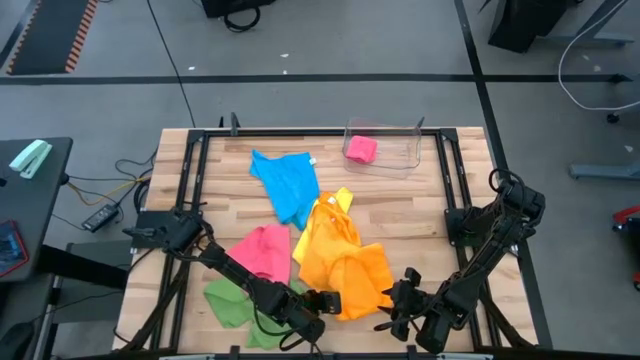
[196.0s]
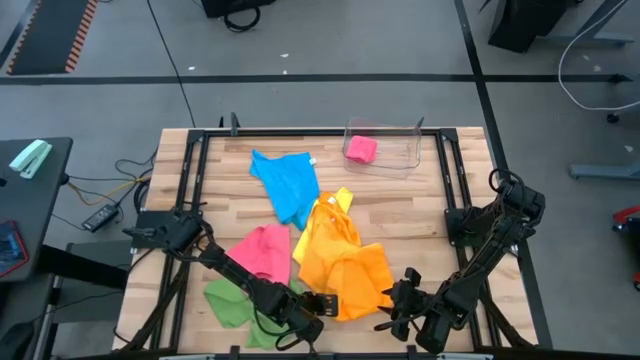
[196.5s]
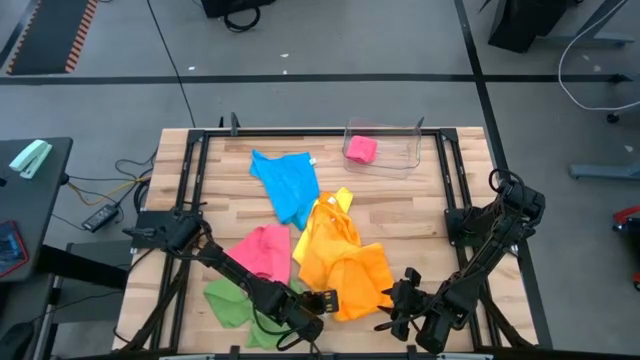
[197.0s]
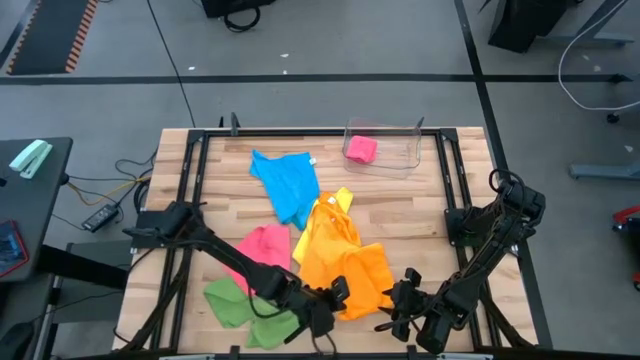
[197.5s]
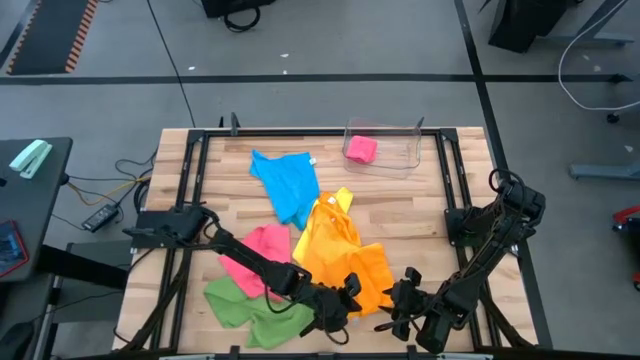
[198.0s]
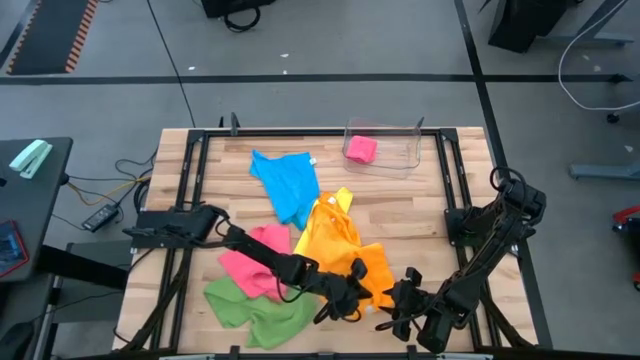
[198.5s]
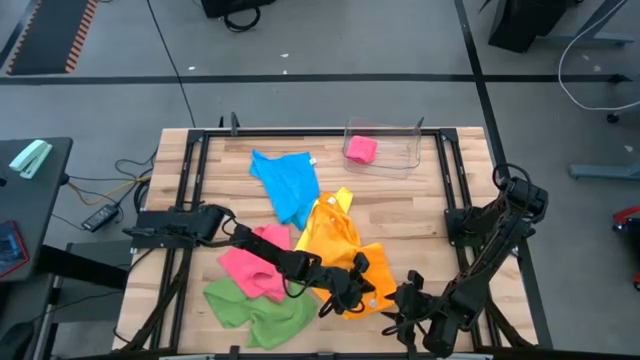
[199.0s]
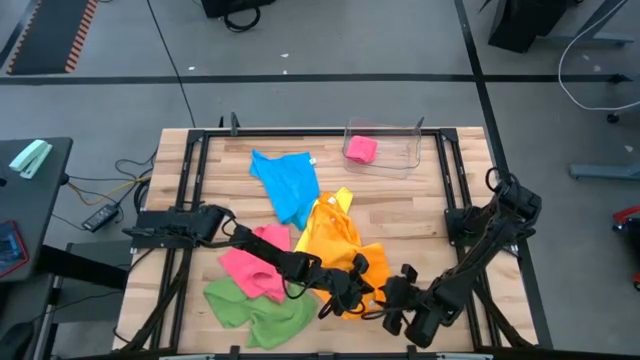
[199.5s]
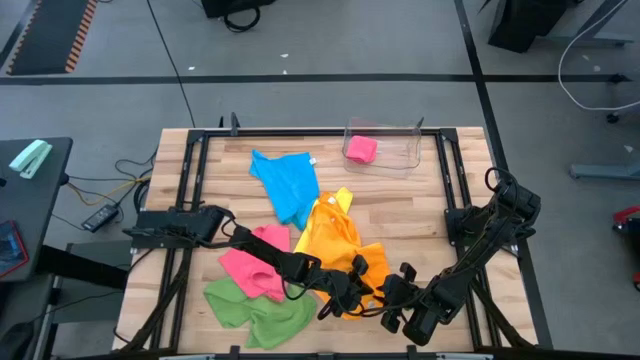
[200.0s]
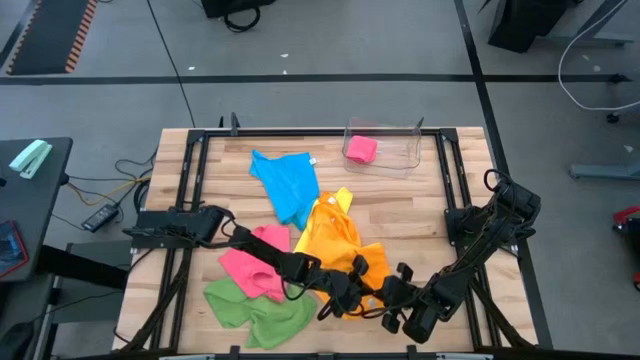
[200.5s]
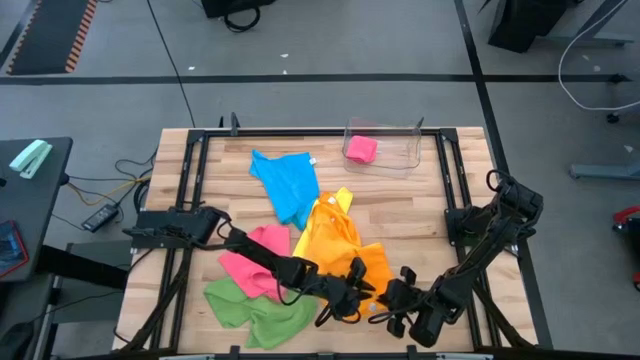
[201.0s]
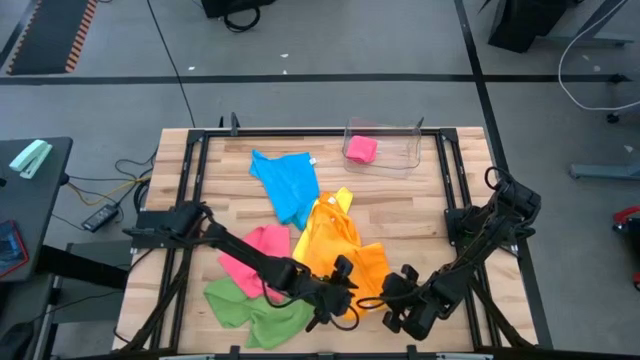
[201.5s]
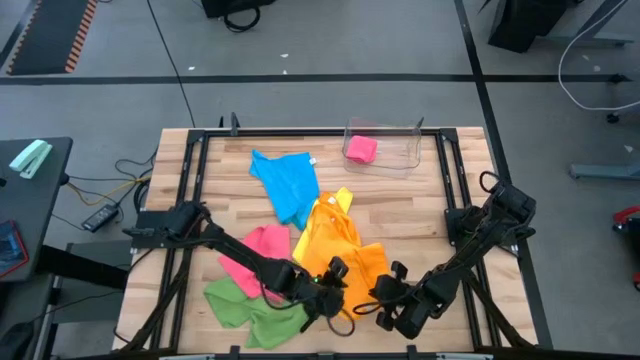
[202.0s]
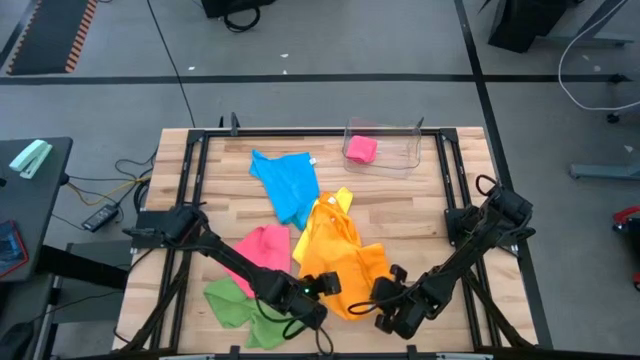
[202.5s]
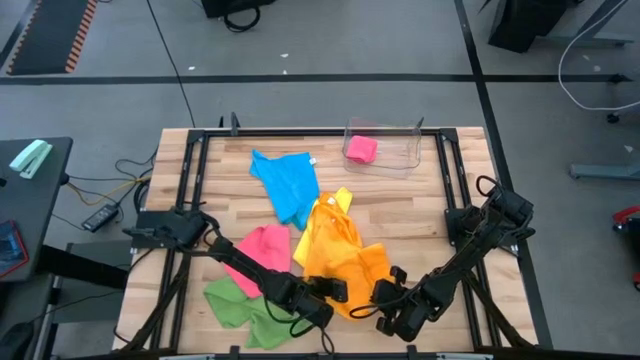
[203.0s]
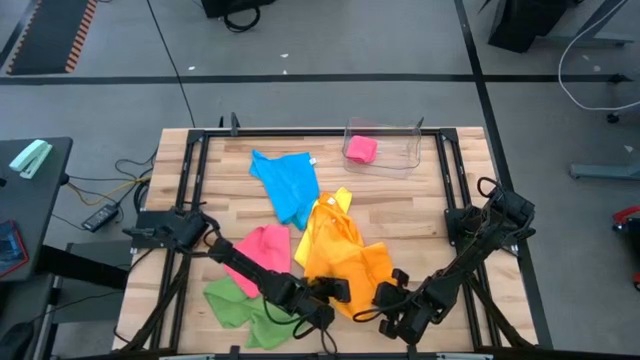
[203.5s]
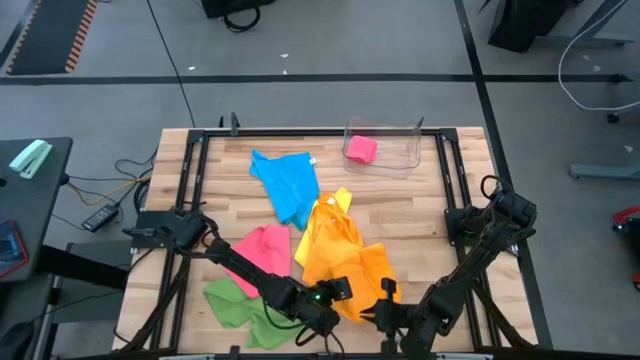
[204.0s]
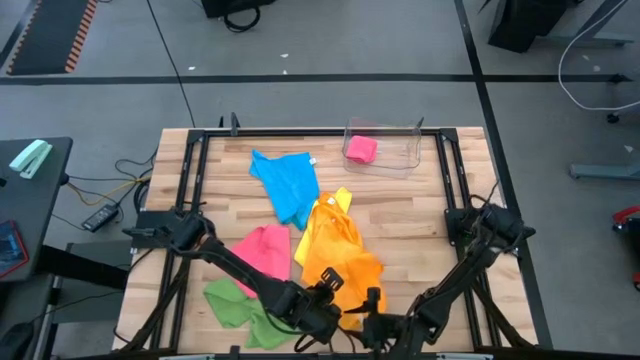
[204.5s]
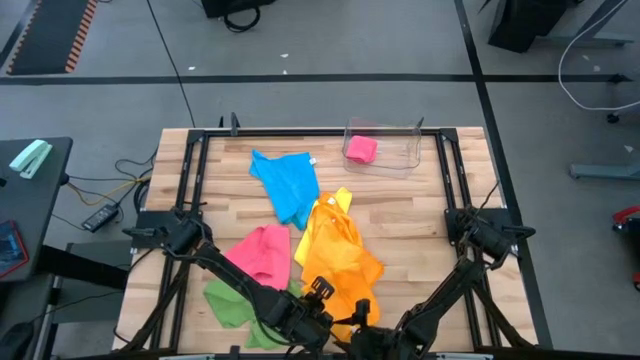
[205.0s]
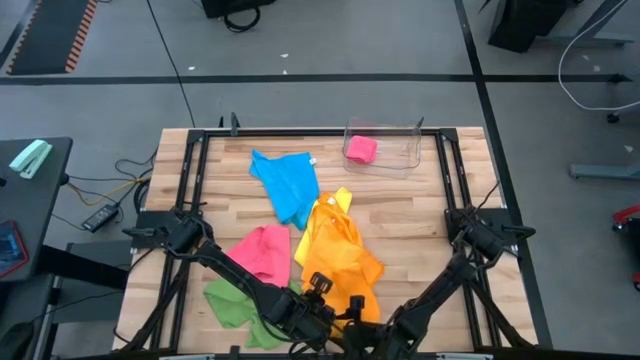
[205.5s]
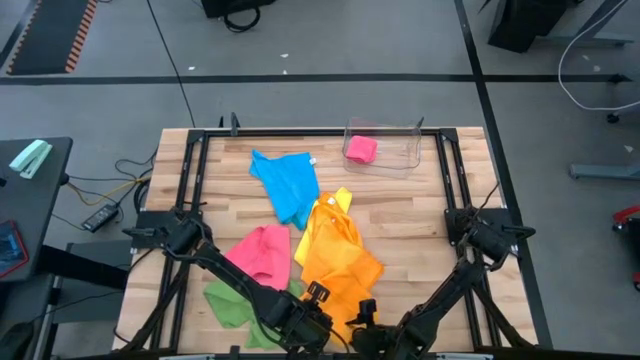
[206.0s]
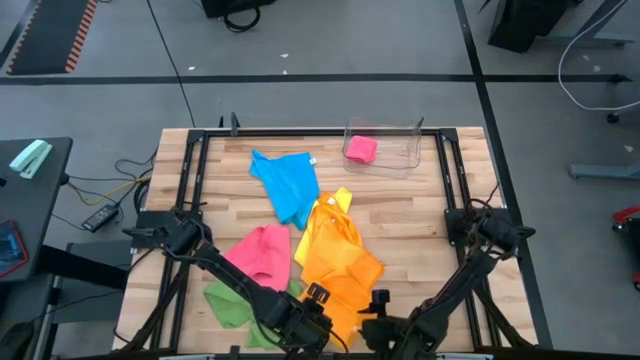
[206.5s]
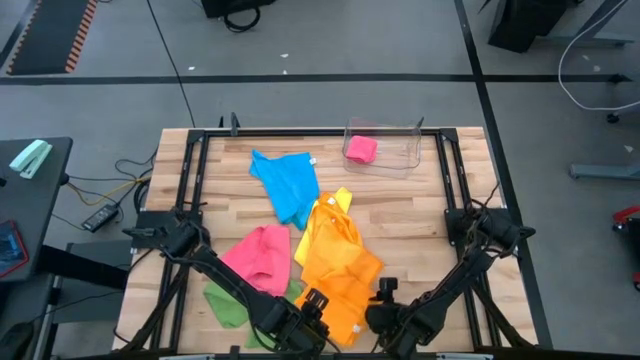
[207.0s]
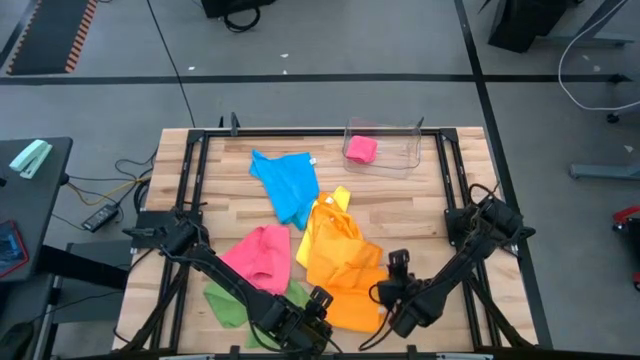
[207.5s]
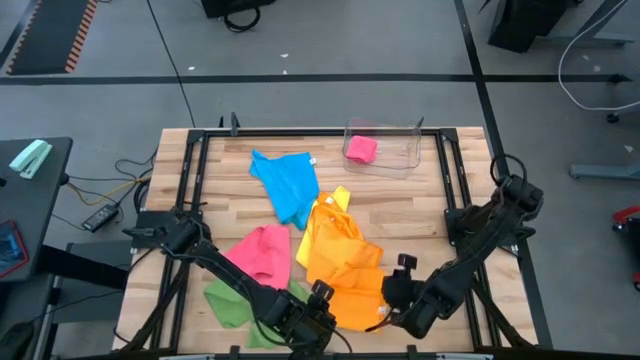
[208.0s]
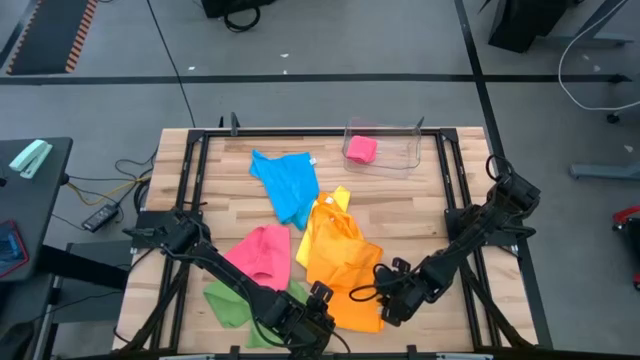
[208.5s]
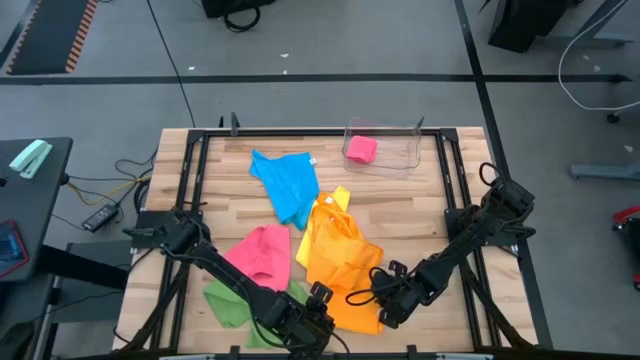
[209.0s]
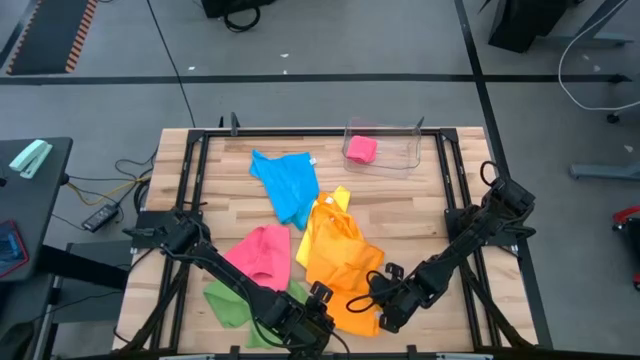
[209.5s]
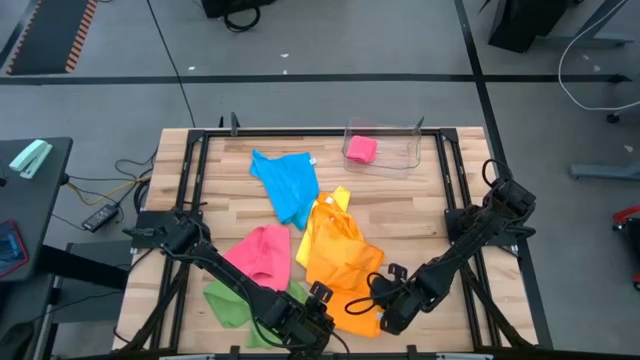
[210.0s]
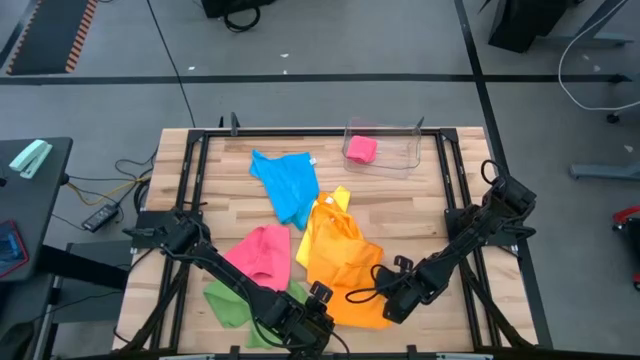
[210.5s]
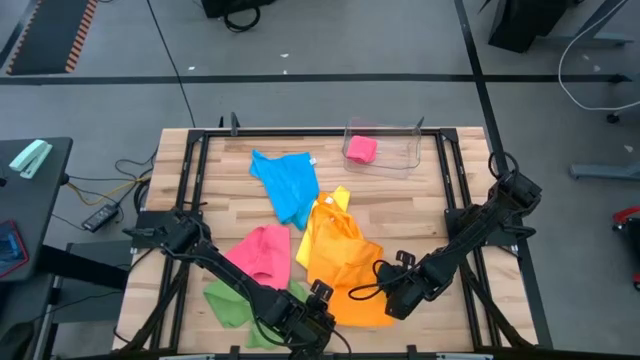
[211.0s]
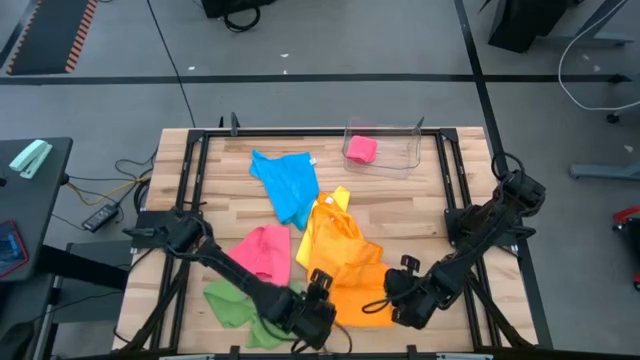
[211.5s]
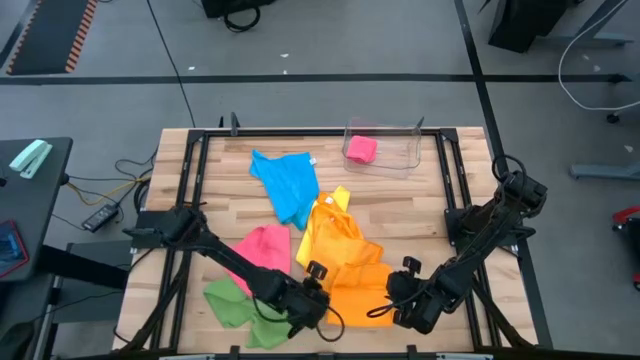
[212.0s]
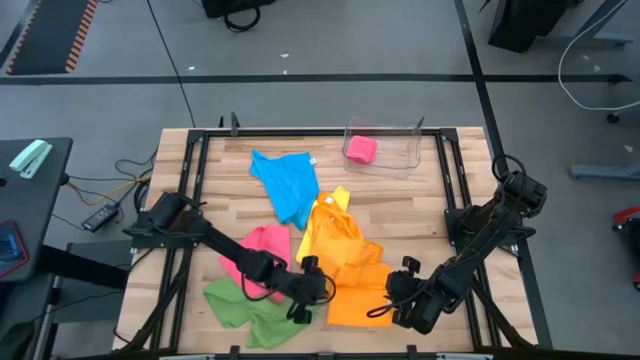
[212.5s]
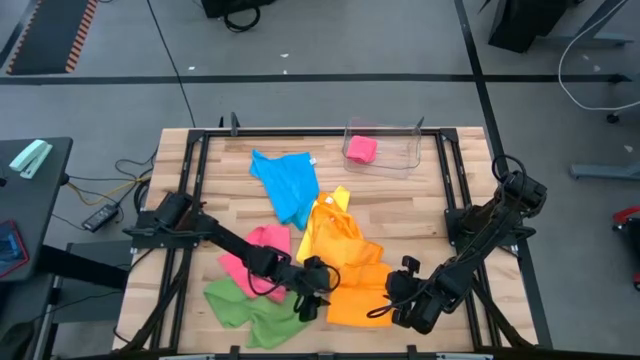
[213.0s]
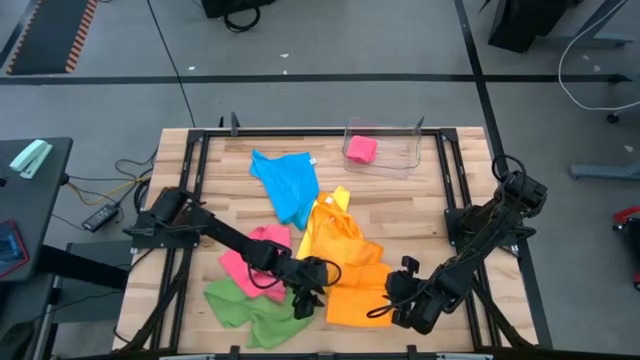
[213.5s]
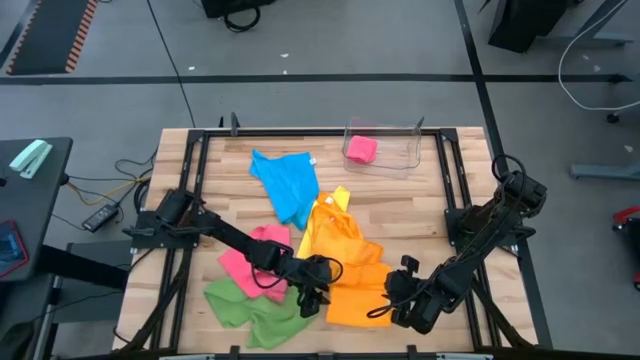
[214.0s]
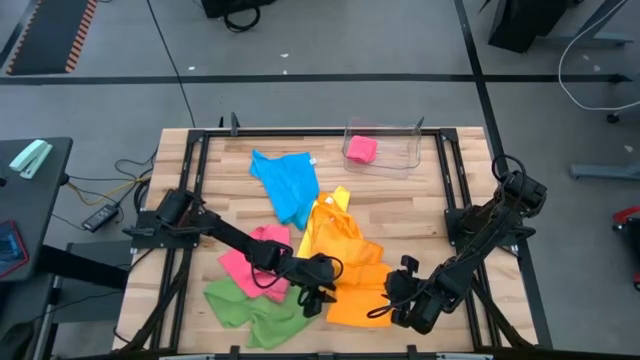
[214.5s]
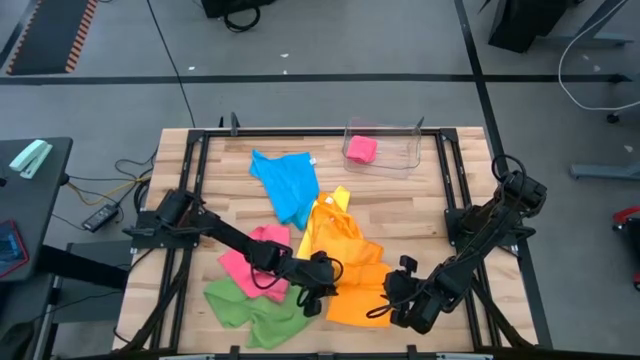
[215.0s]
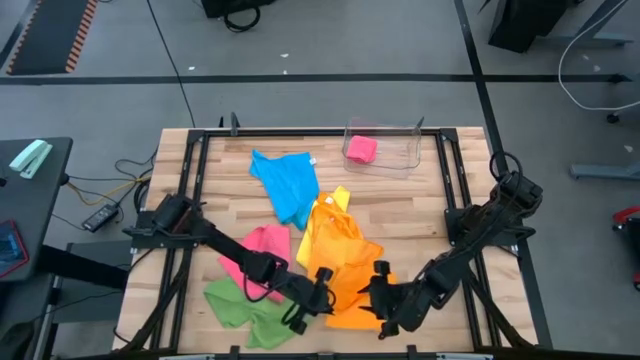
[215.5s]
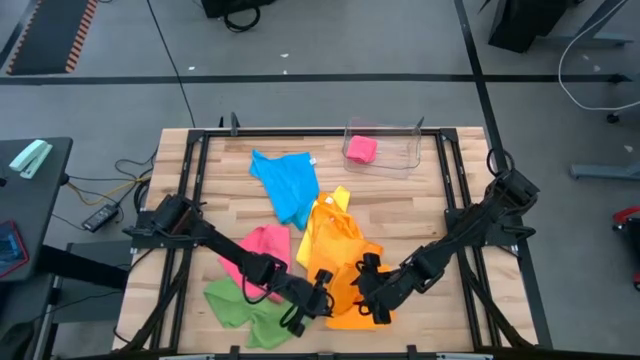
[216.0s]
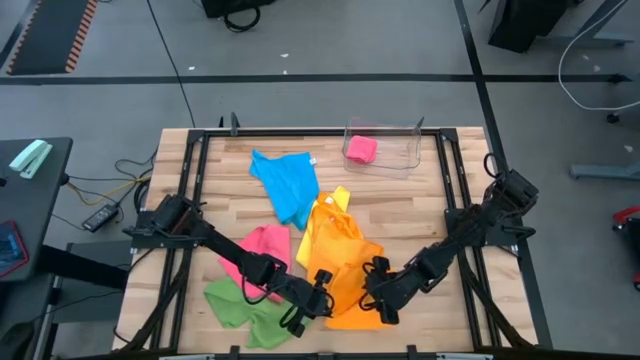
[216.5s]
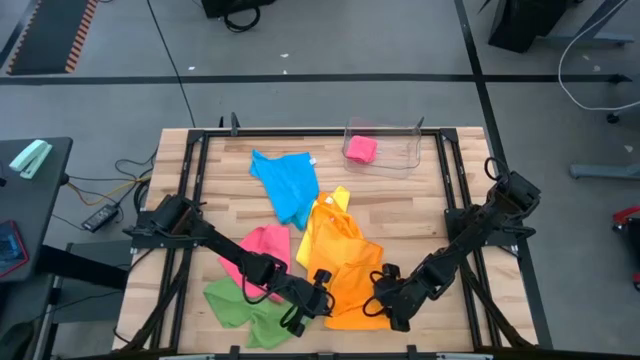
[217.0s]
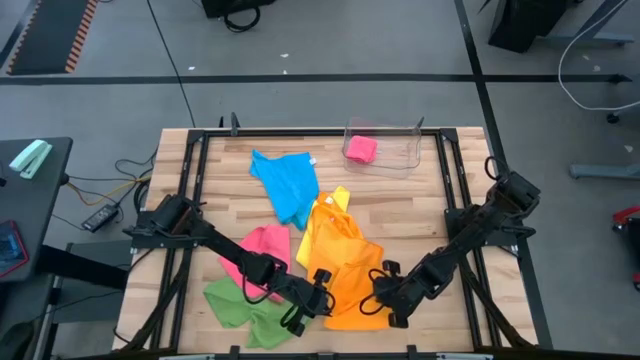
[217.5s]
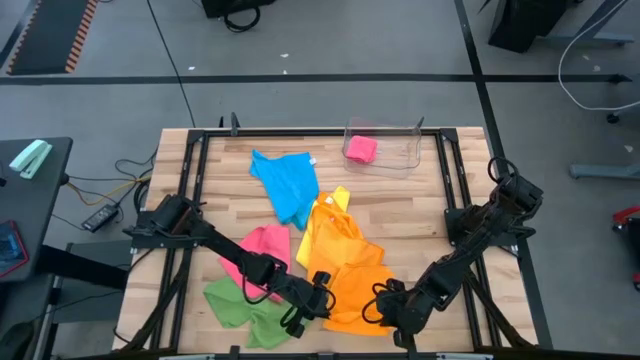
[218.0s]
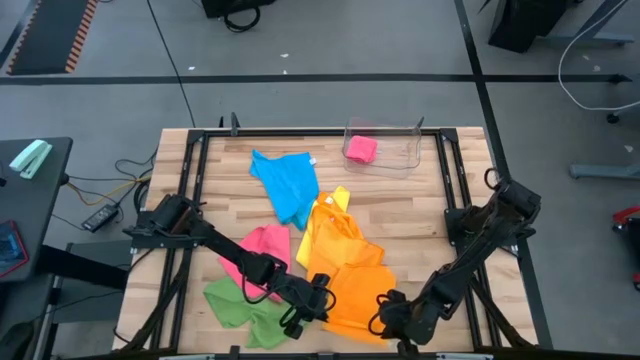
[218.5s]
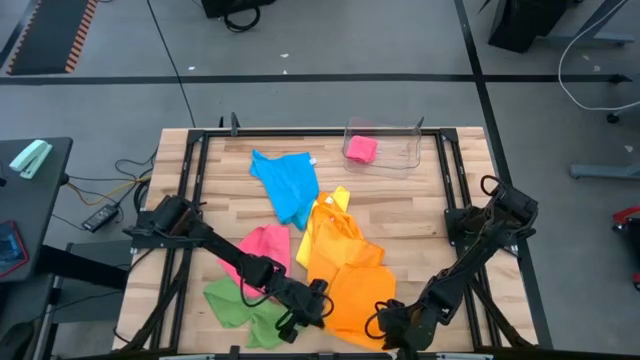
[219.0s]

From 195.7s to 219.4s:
Task: Fold microfiber towels
Fold the right orange microfiber cloth
